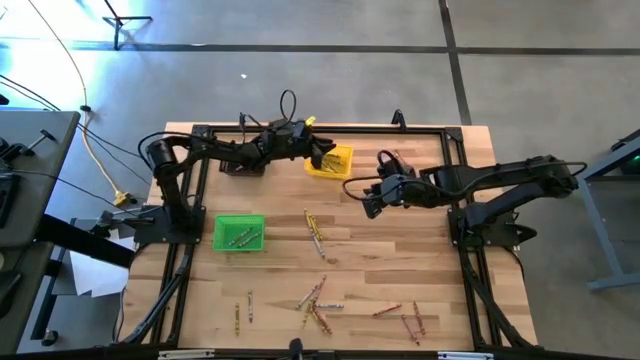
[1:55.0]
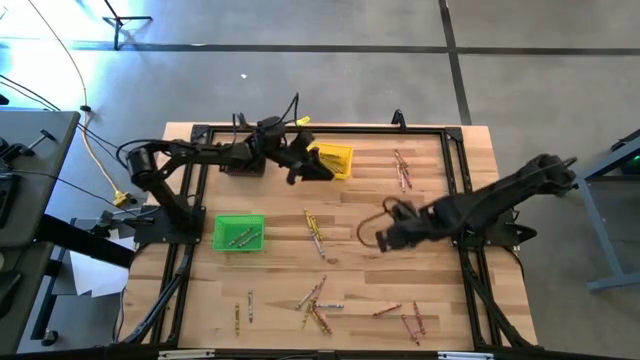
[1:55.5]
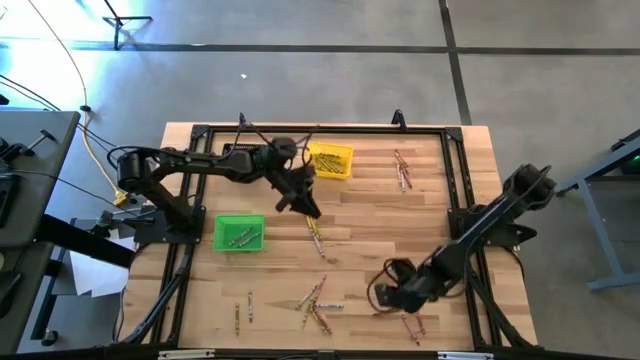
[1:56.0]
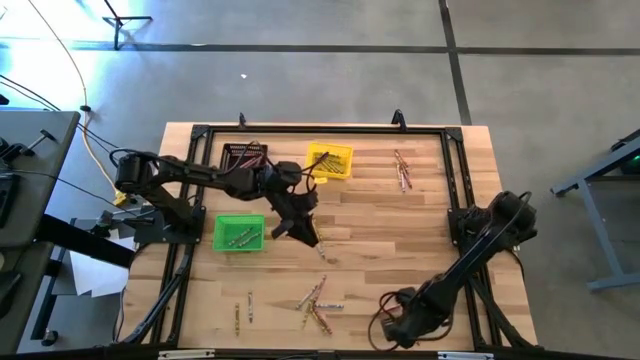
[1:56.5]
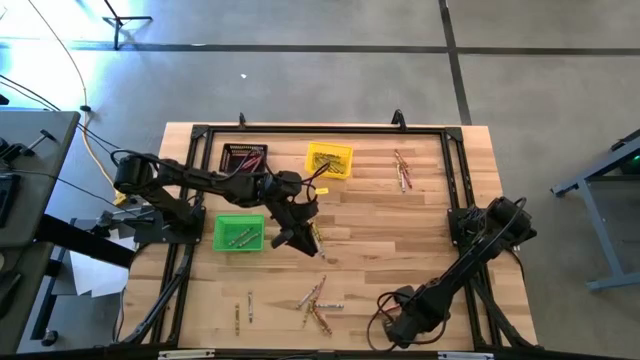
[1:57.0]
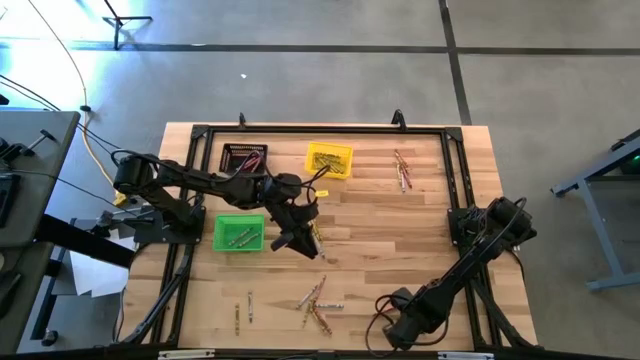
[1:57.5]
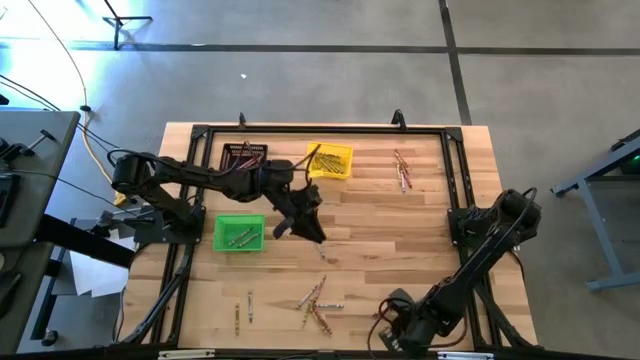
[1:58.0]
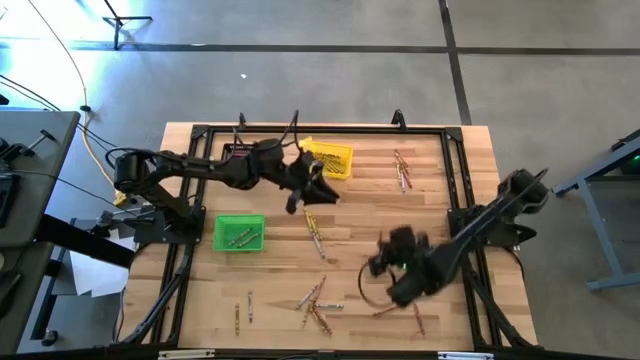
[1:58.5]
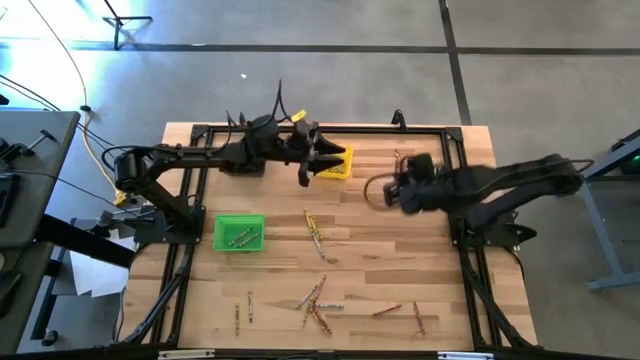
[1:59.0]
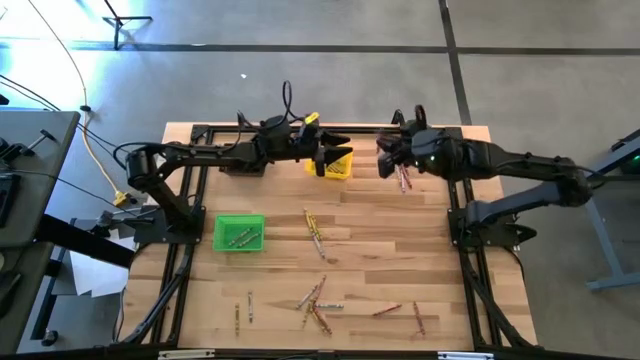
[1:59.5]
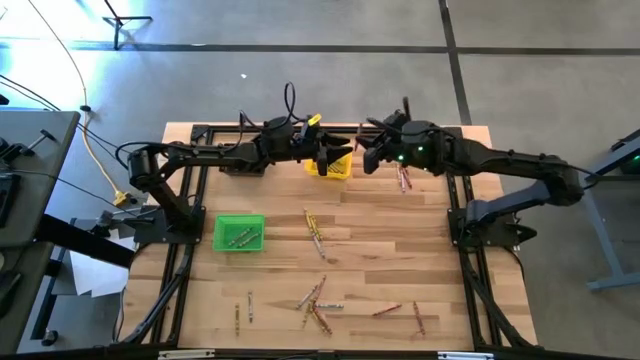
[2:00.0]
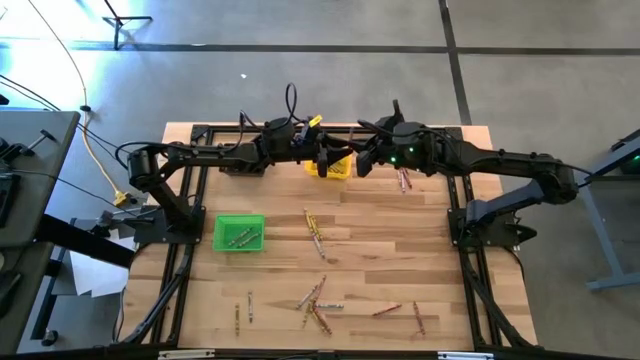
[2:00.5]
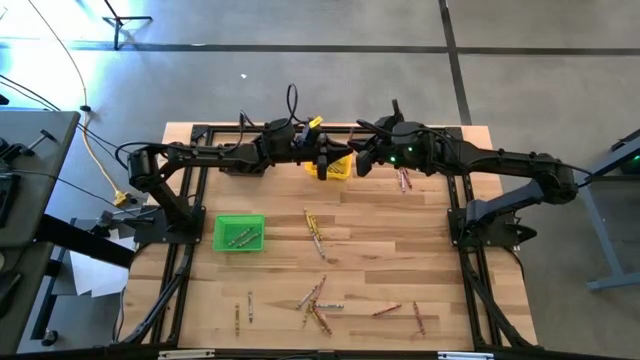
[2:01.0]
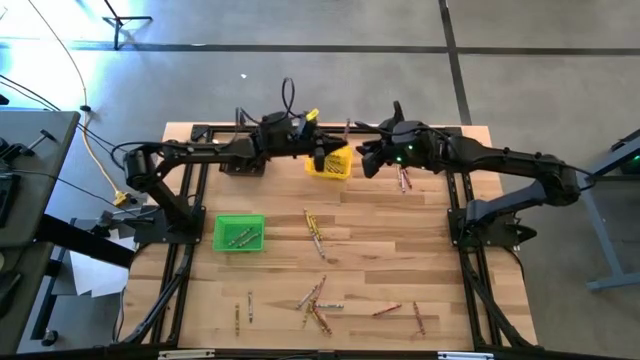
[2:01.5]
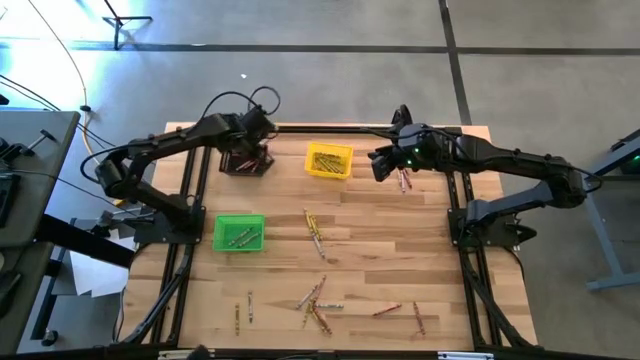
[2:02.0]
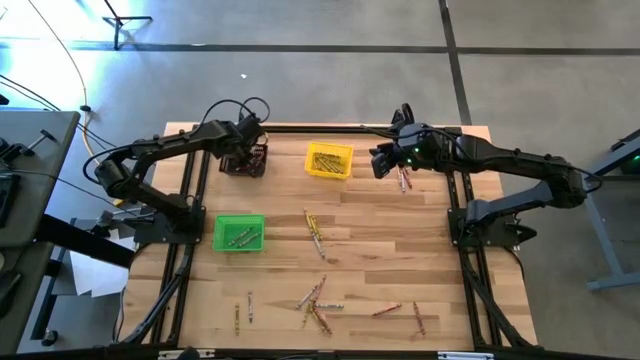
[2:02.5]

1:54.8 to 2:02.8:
Task: Sort crayons
Put the red crayon into the black bin

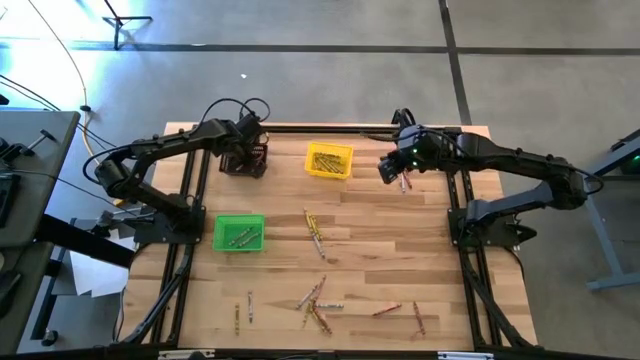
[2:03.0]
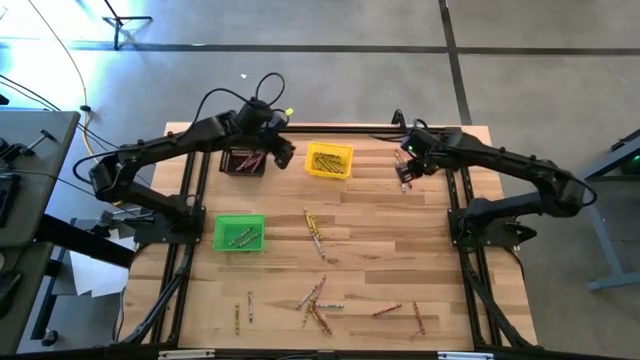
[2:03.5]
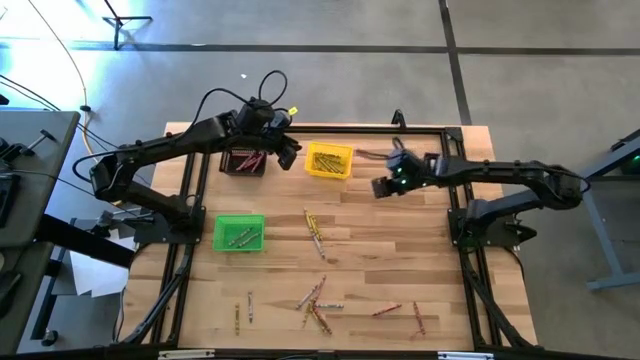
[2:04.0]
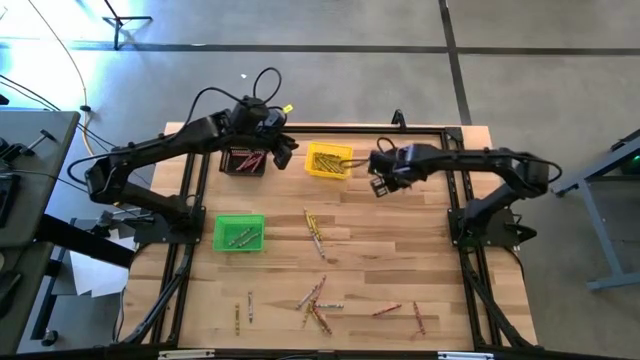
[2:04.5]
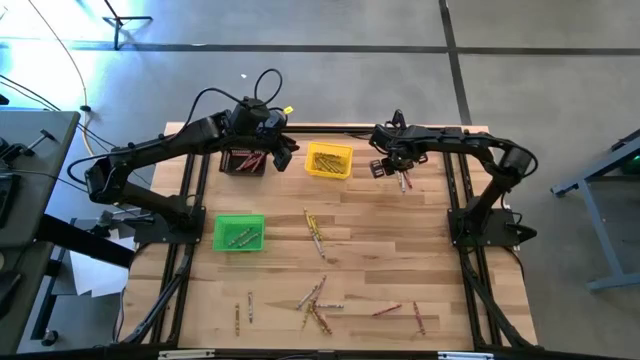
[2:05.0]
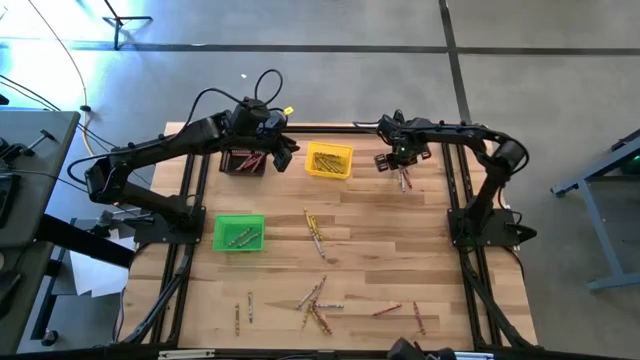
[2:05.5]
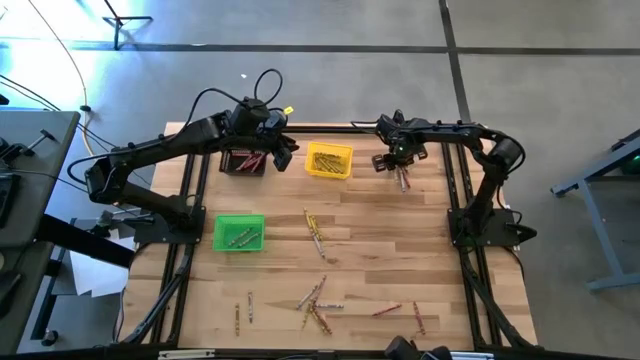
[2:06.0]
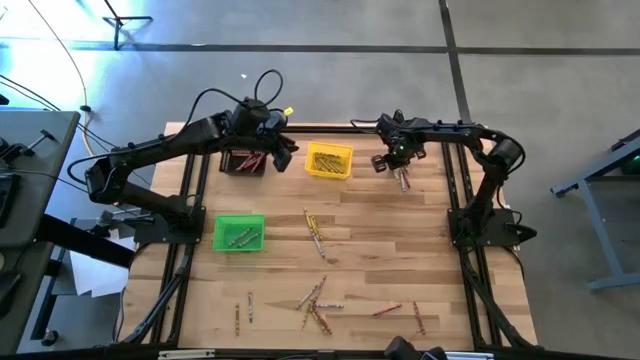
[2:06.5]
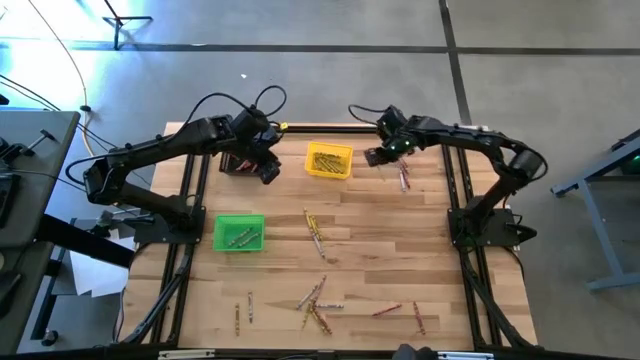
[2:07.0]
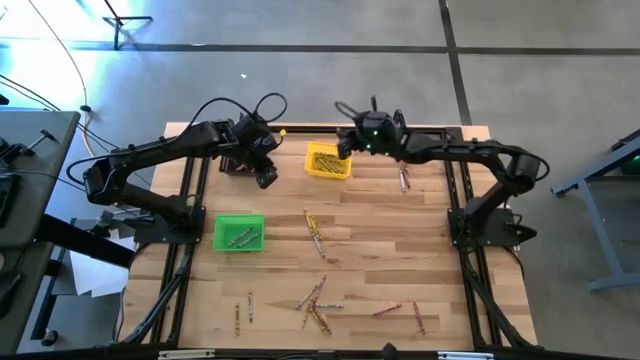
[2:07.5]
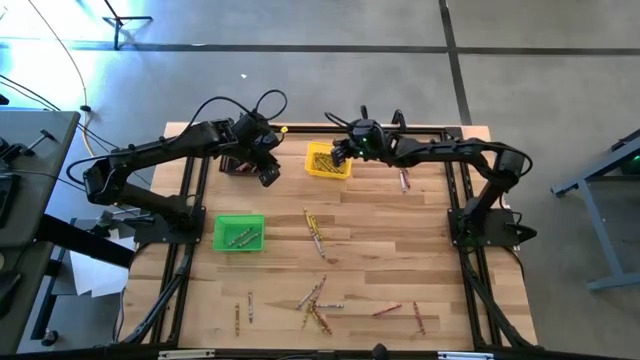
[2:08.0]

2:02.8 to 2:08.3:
Put the yellow crayon into the yellow bin

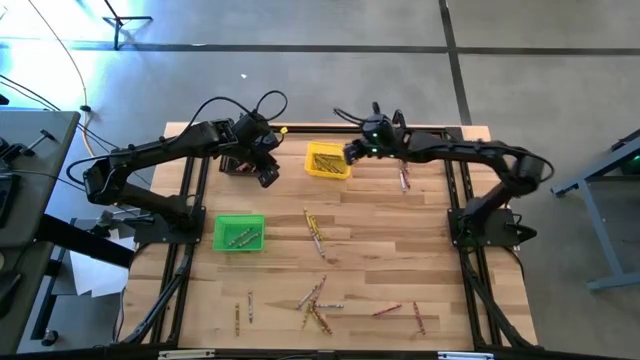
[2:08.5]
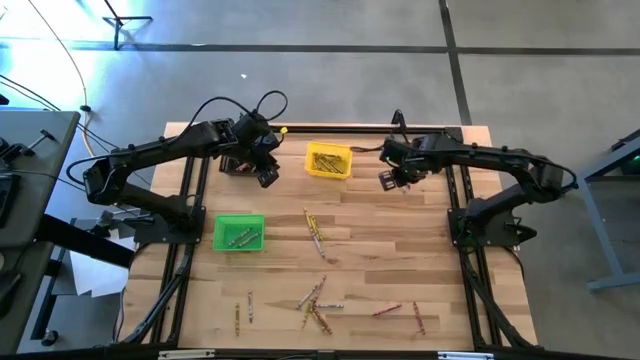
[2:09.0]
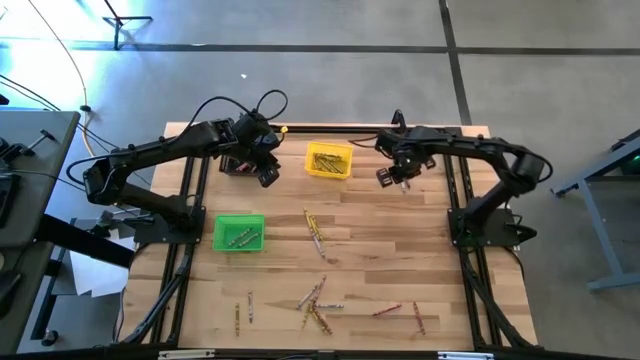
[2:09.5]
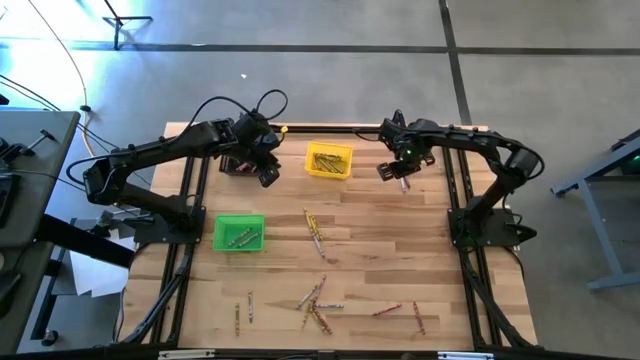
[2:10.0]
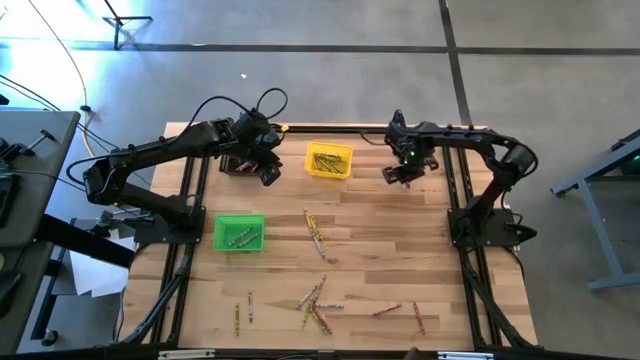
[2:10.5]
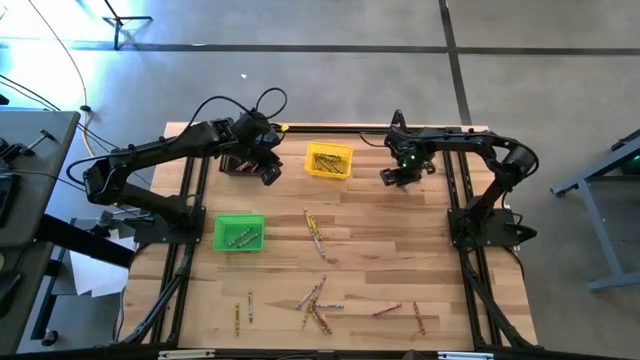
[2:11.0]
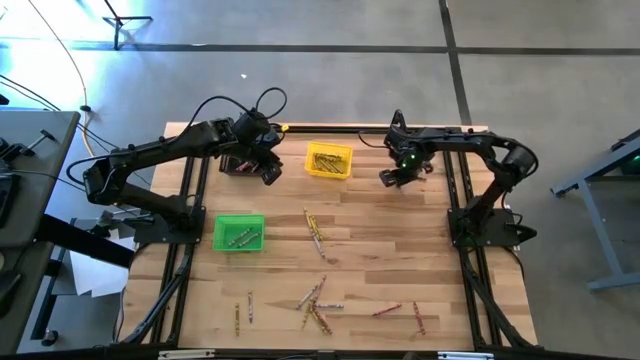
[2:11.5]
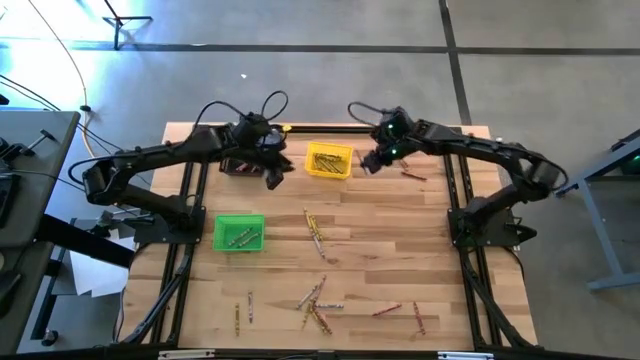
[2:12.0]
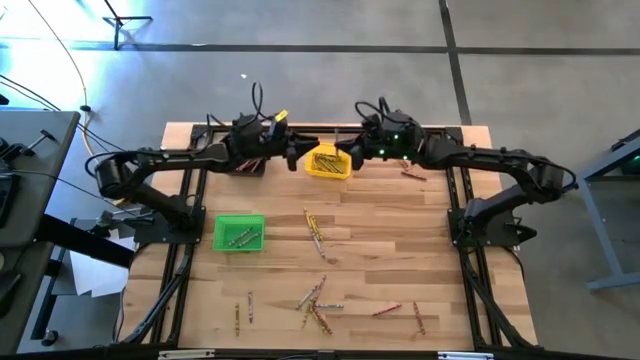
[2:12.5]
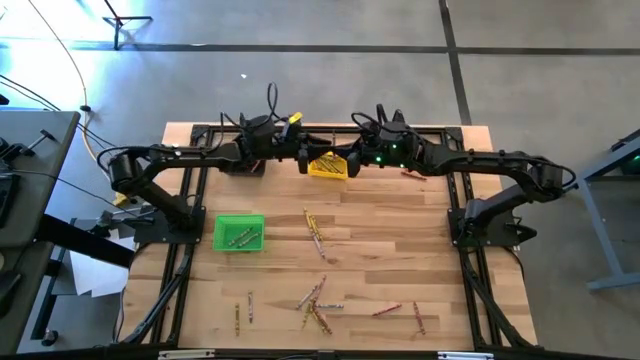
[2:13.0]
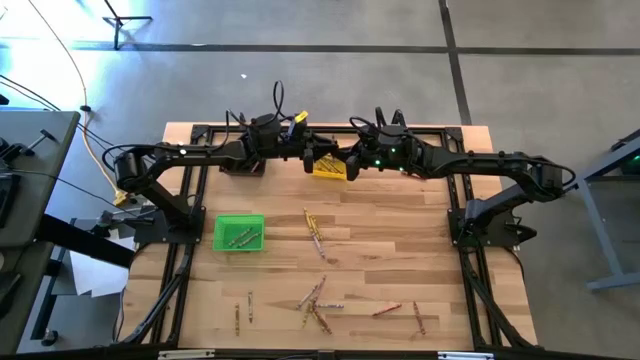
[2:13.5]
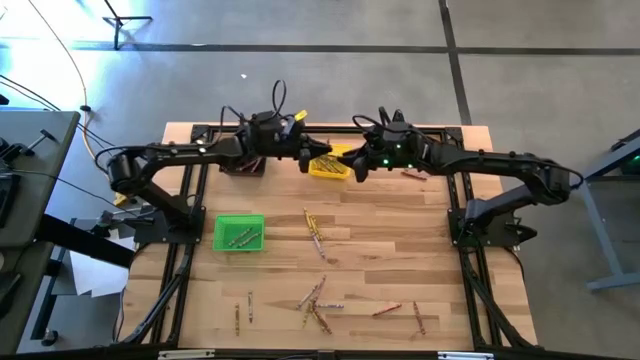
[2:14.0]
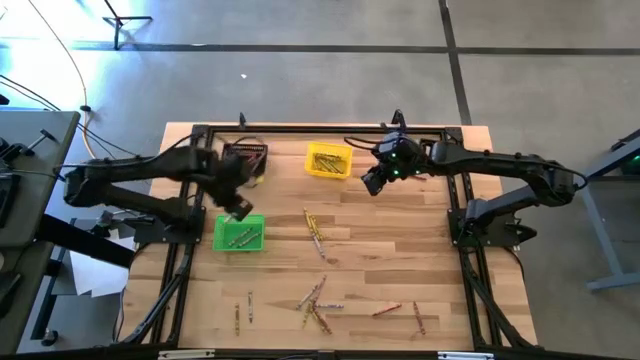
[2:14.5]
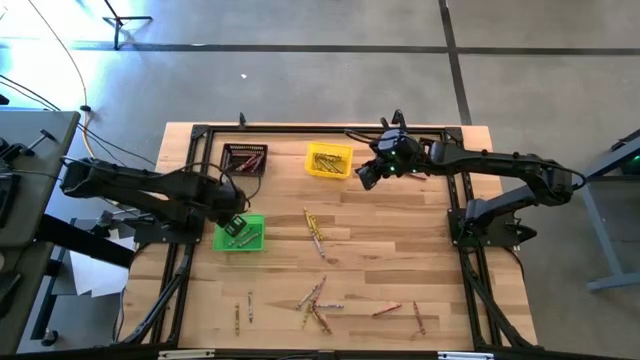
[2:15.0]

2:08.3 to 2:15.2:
Put the blue crayon into the green bin

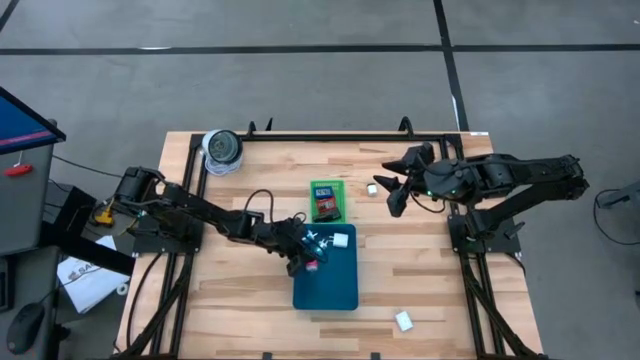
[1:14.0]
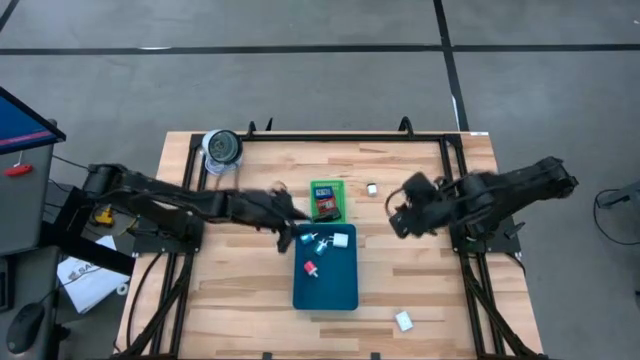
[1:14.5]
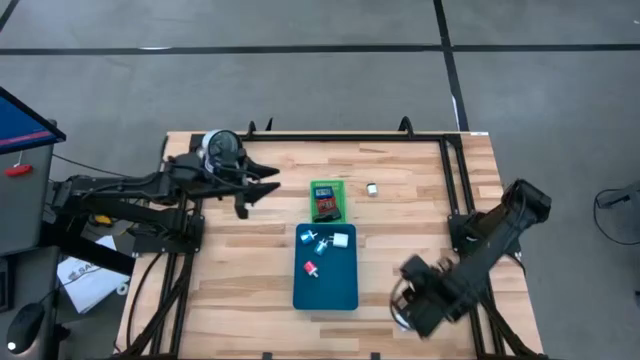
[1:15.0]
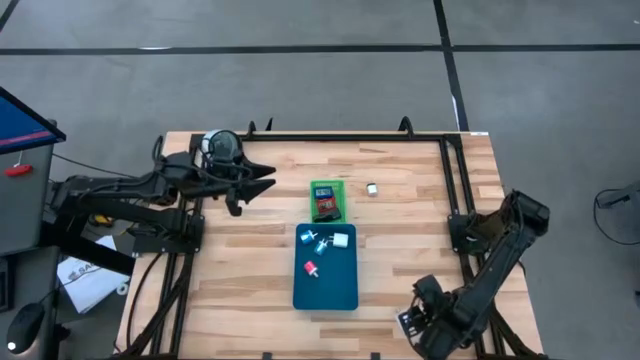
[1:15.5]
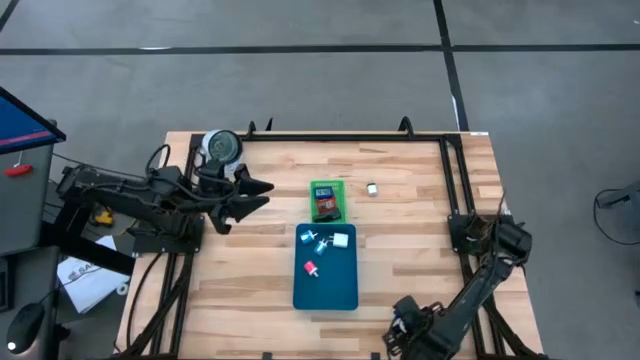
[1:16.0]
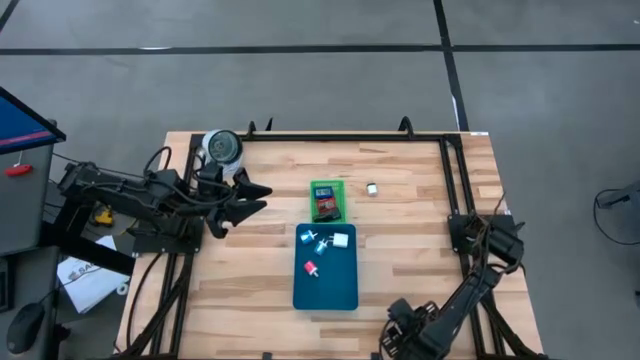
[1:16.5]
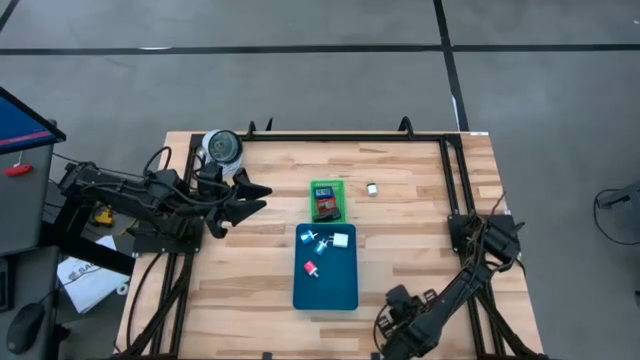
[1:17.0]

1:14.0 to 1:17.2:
Task: Pick & Place Office items
Put the bottom white charger adapter into the blue bin
